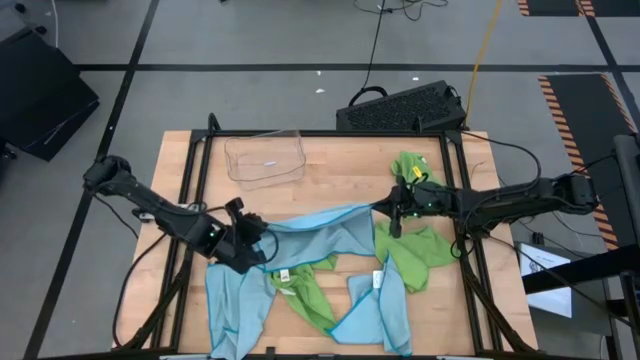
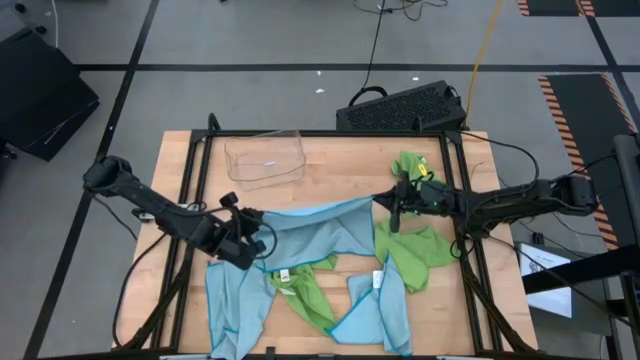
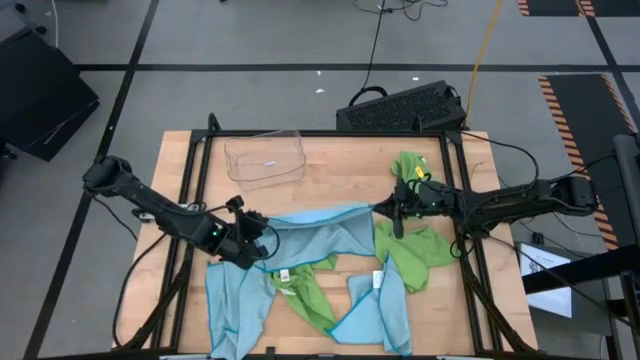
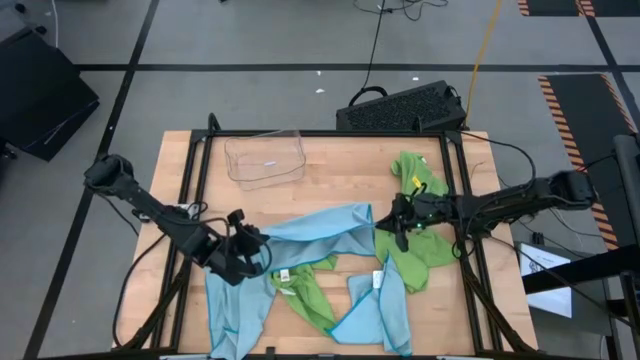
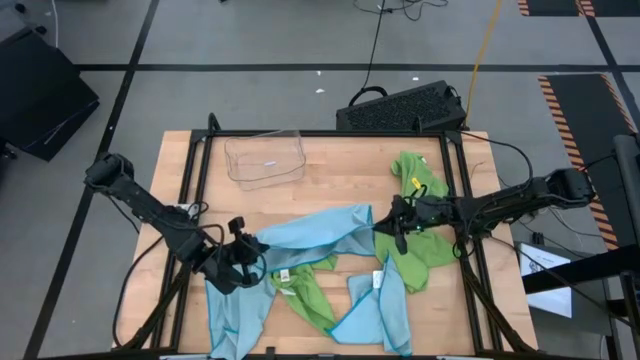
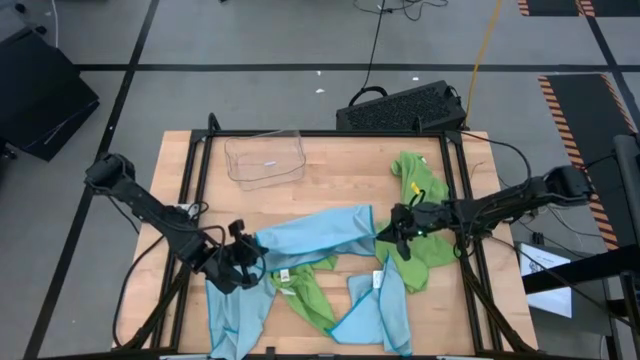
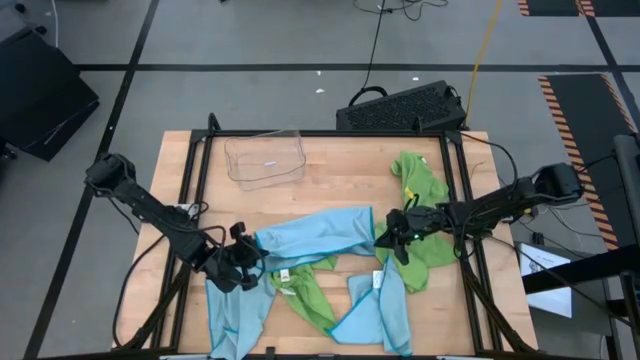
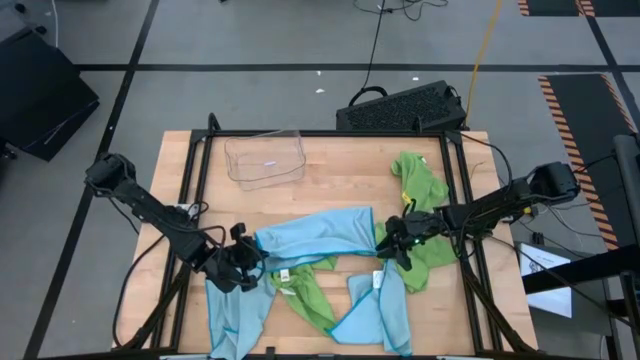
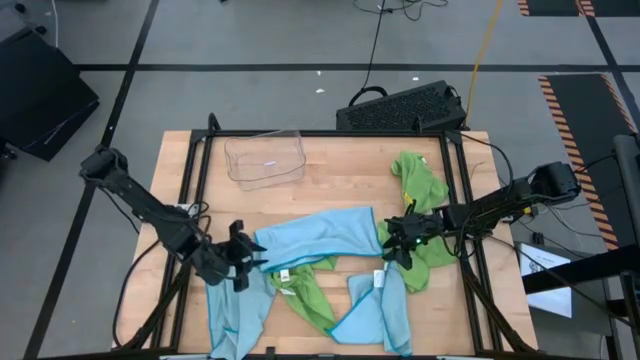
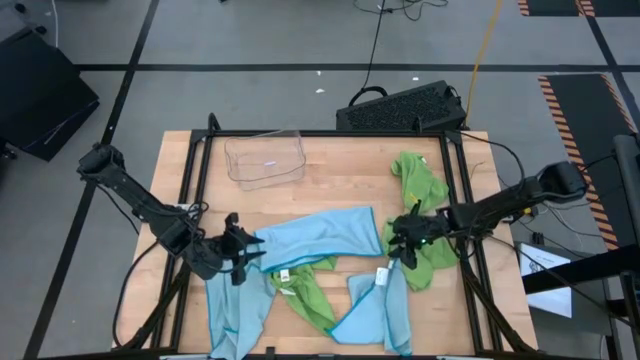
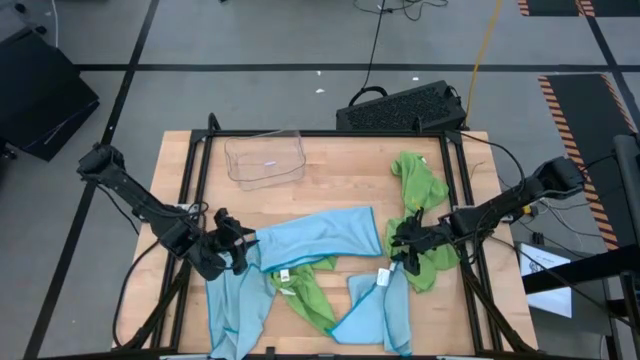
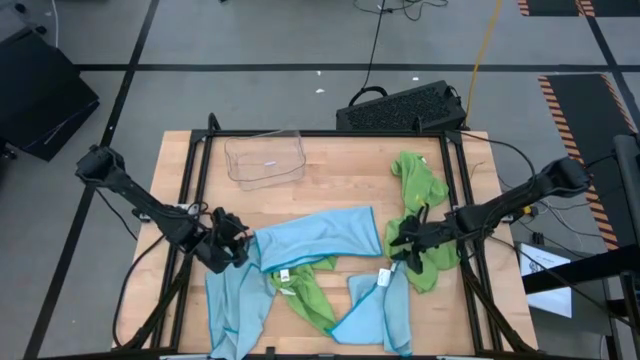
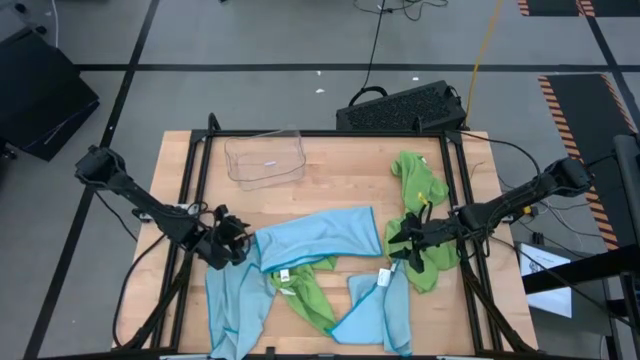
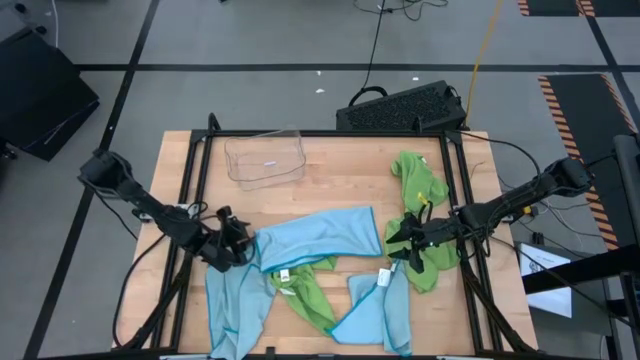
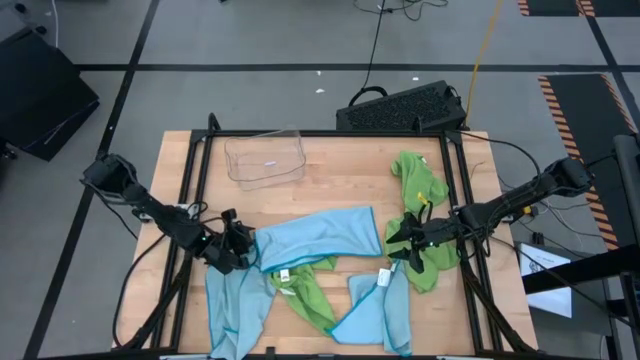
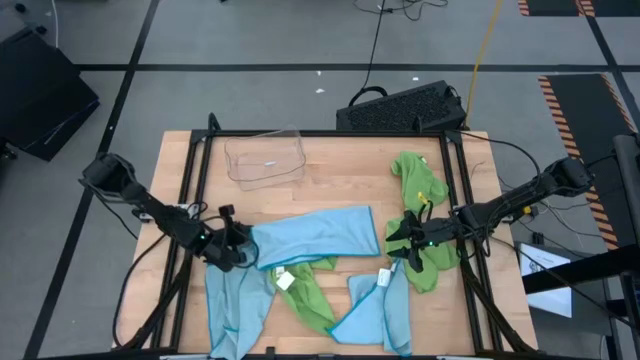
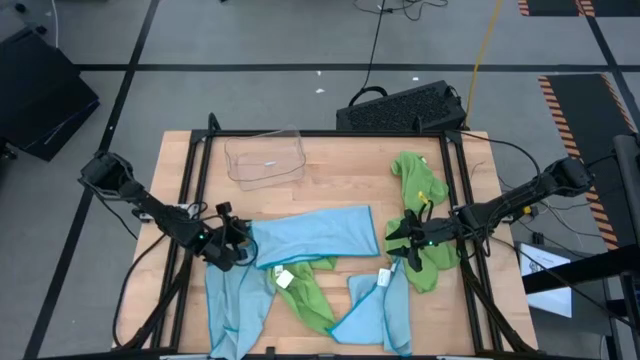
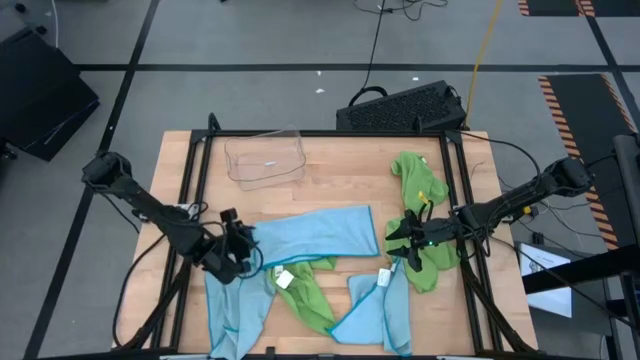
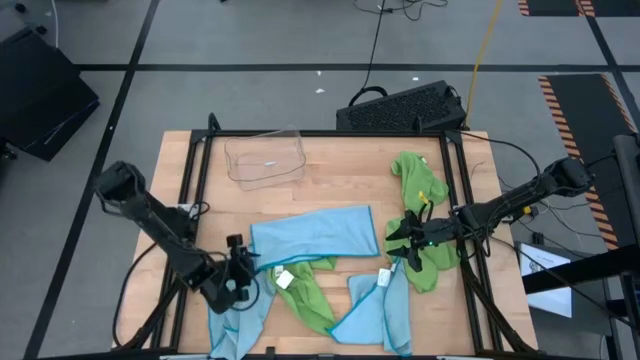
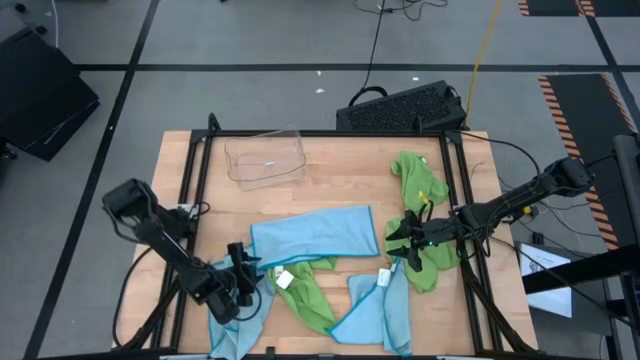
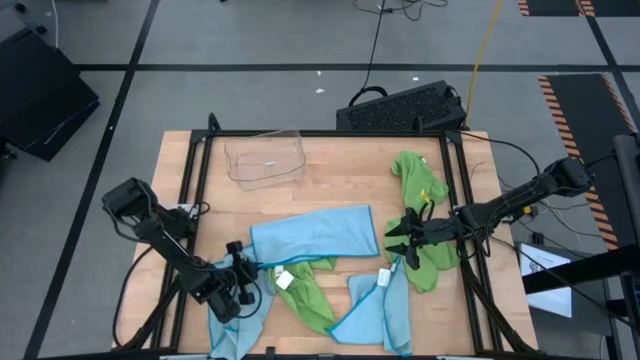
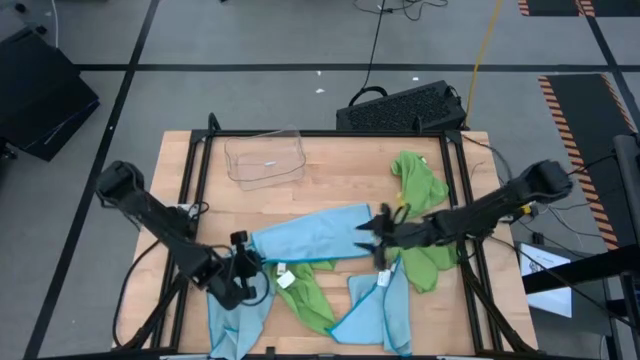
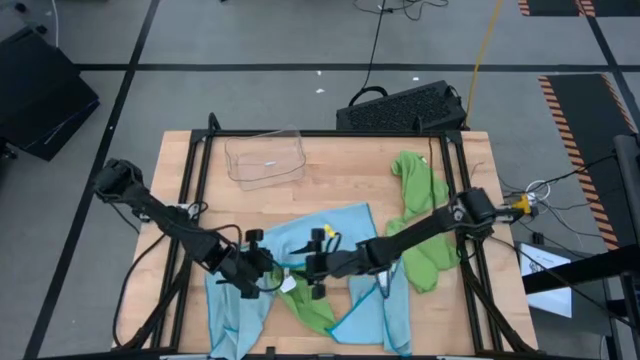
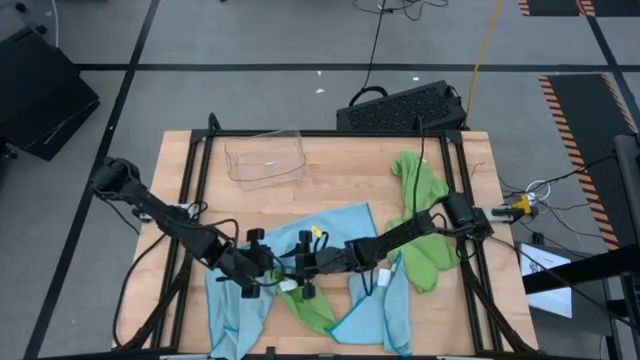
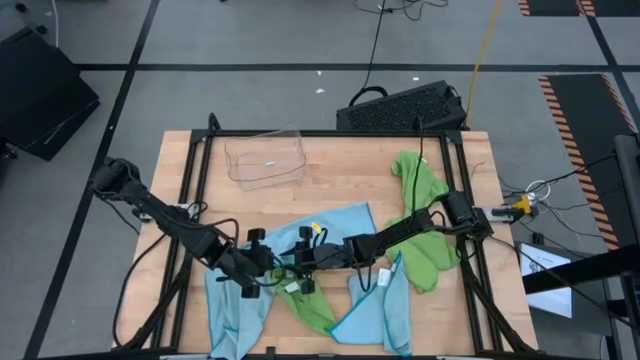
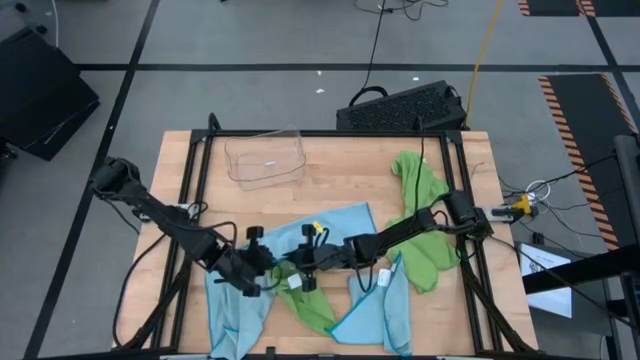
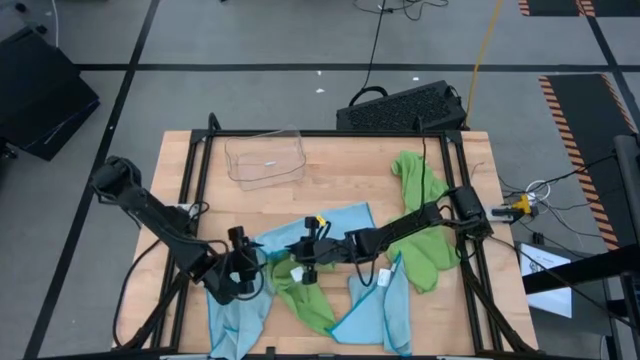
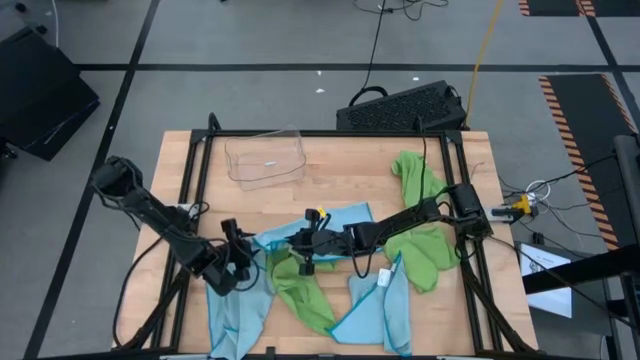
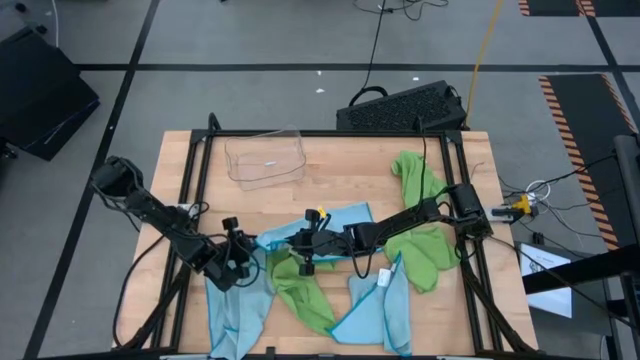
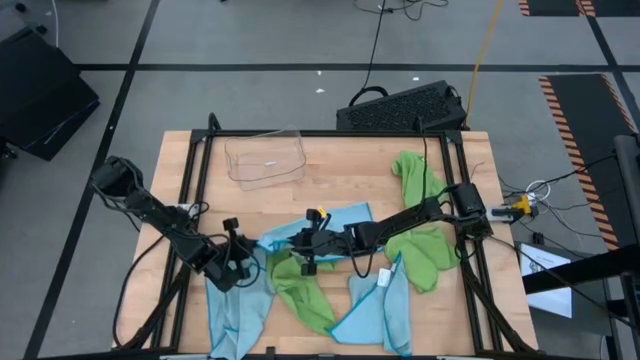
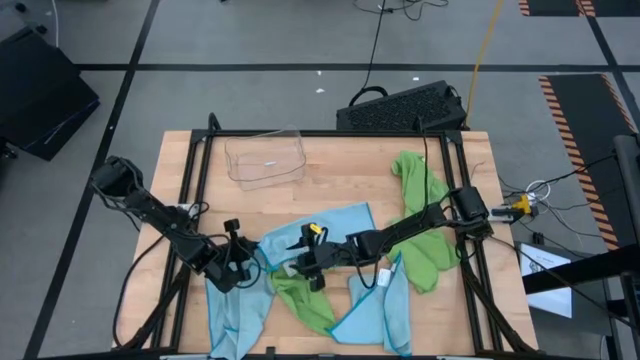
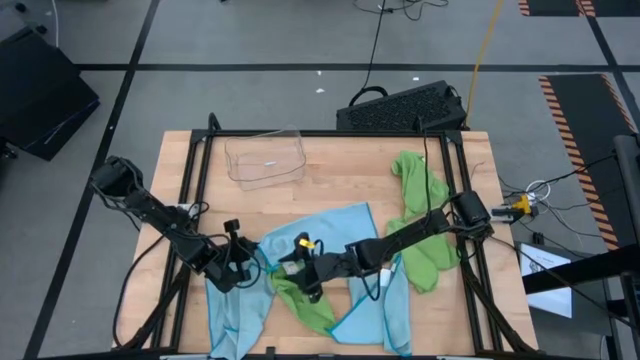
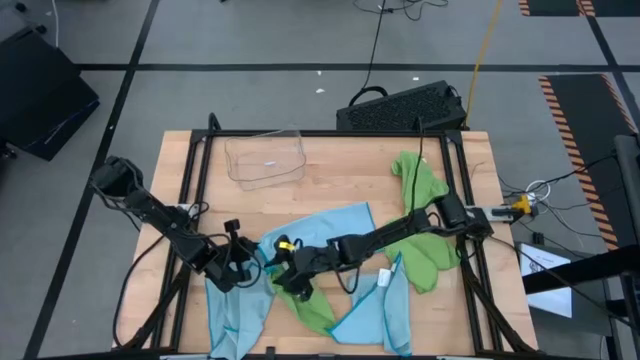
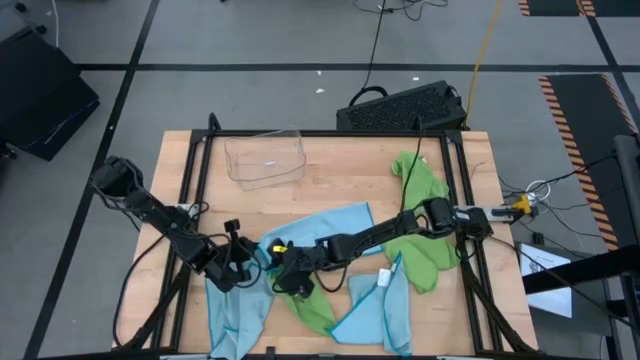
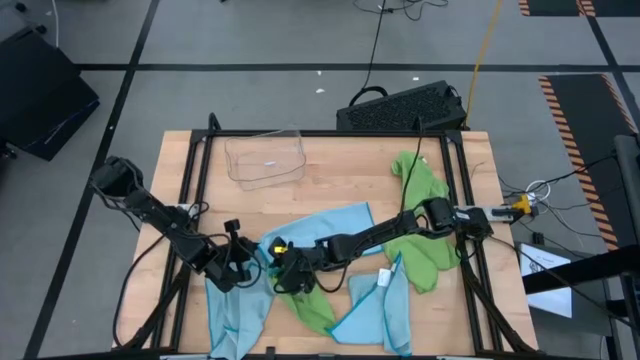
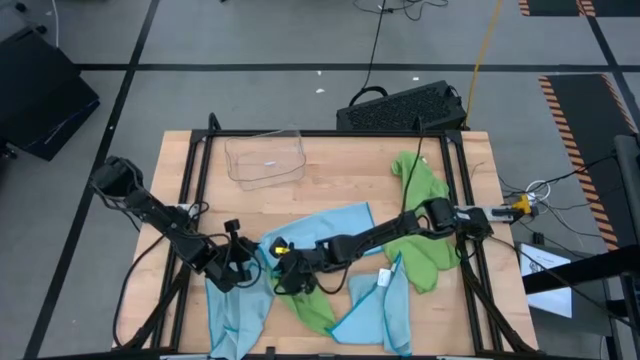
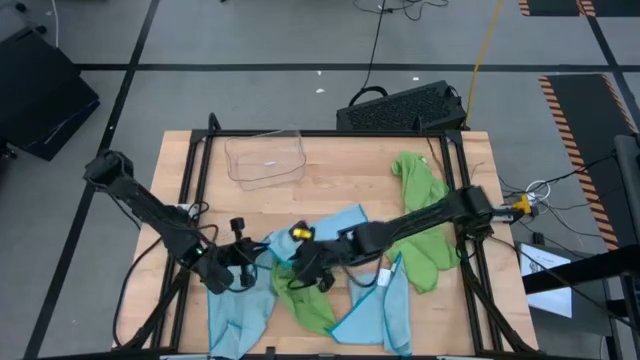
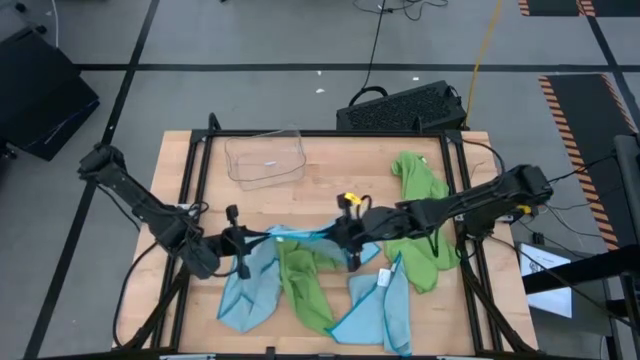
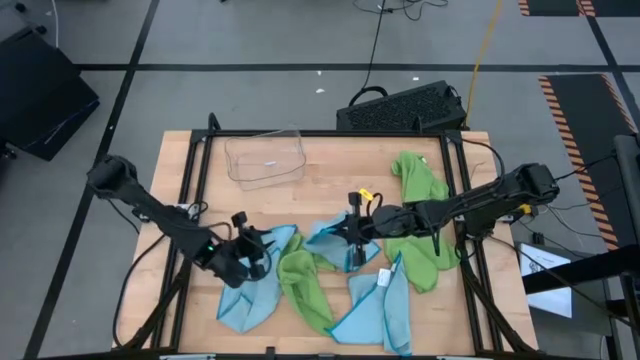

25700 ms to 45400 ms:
Task: Fold microfiber towels
Fold the top center blue microfiber cloth
